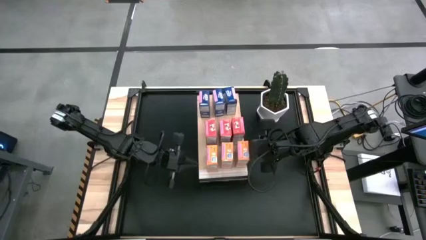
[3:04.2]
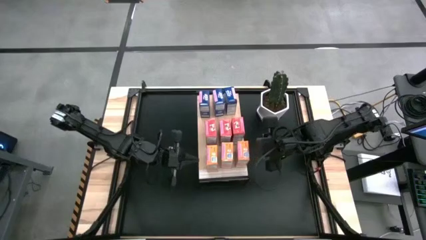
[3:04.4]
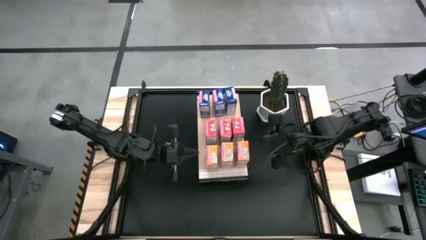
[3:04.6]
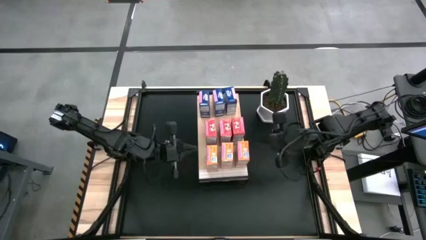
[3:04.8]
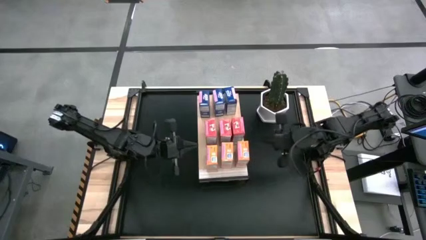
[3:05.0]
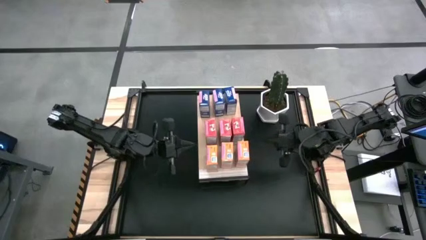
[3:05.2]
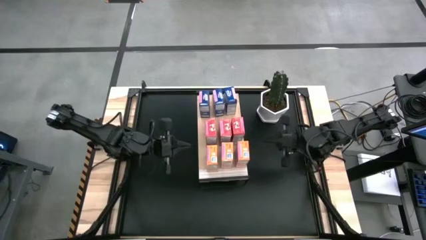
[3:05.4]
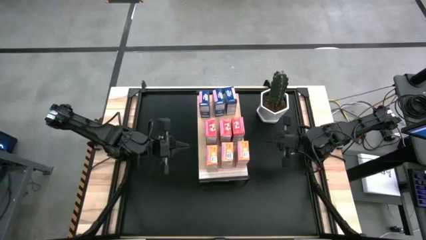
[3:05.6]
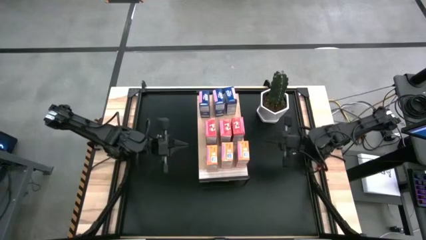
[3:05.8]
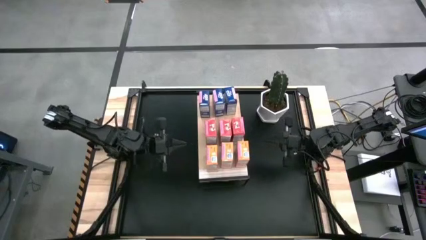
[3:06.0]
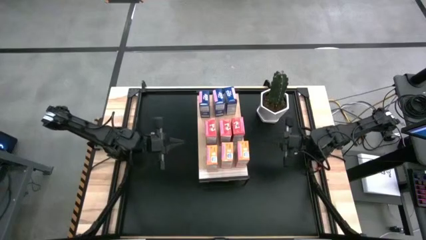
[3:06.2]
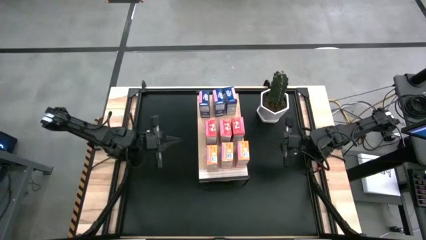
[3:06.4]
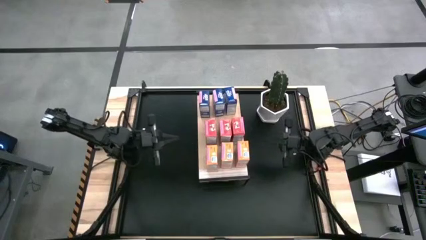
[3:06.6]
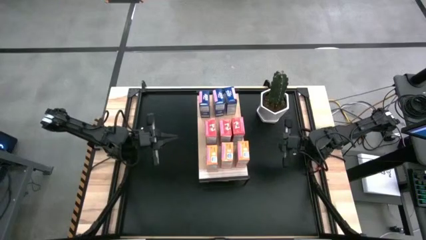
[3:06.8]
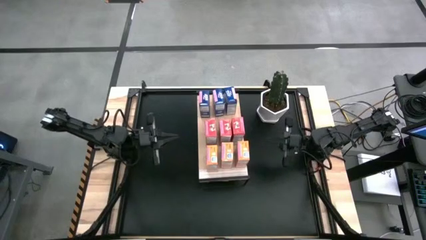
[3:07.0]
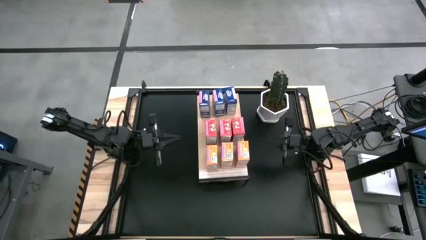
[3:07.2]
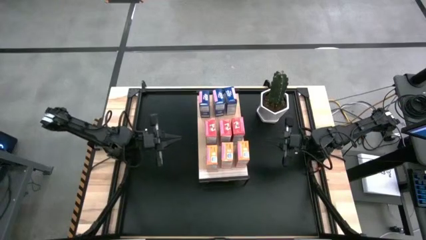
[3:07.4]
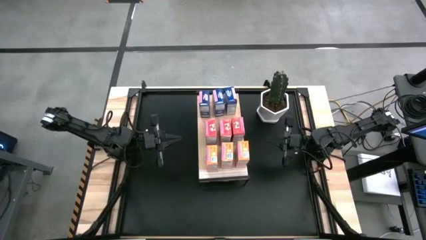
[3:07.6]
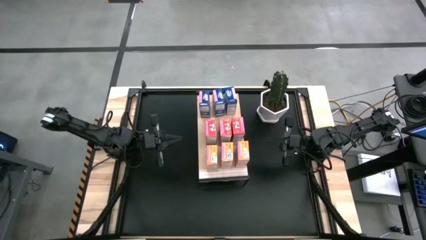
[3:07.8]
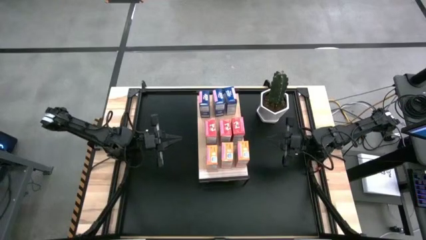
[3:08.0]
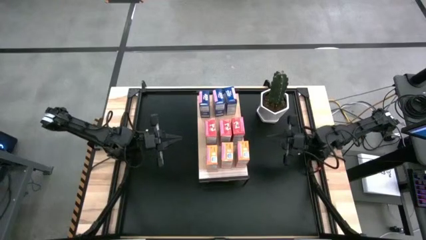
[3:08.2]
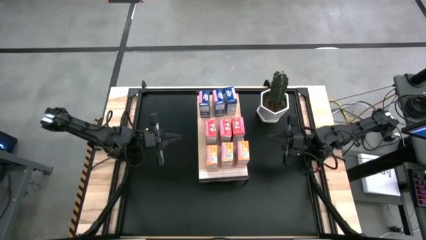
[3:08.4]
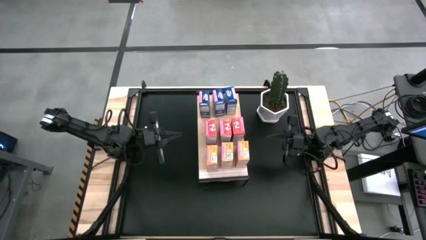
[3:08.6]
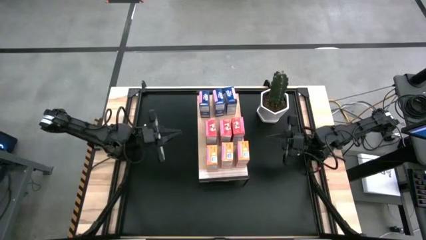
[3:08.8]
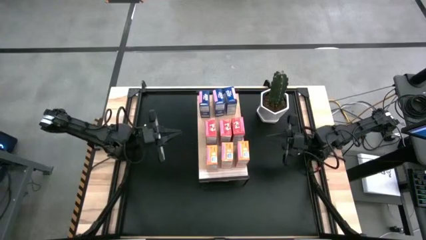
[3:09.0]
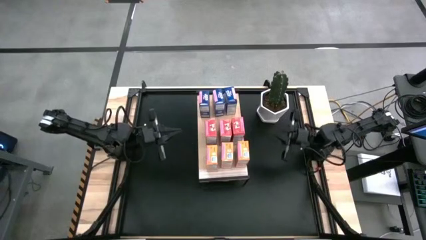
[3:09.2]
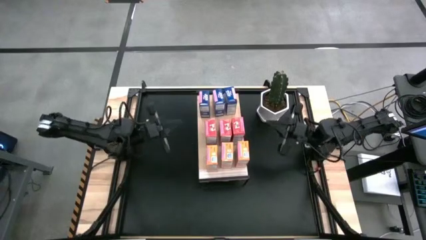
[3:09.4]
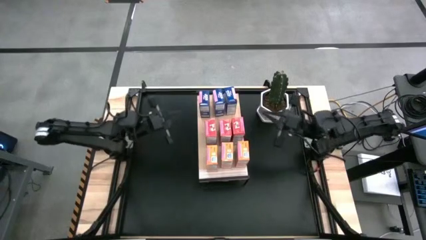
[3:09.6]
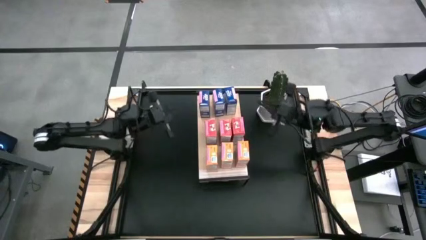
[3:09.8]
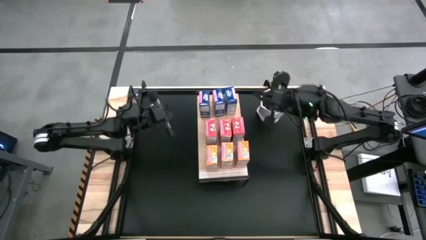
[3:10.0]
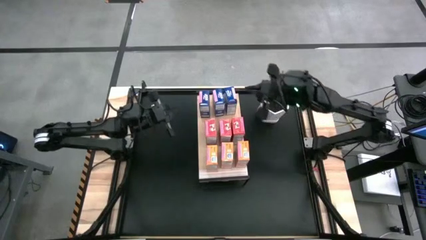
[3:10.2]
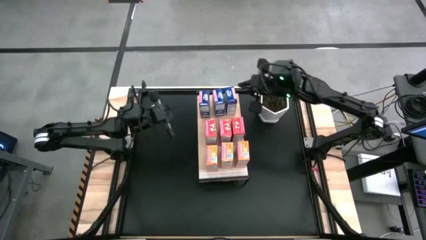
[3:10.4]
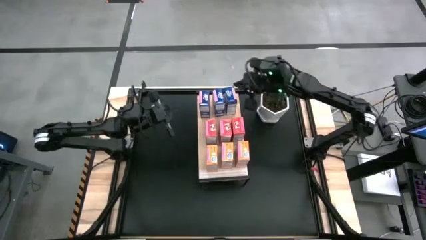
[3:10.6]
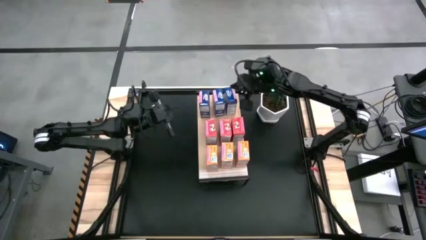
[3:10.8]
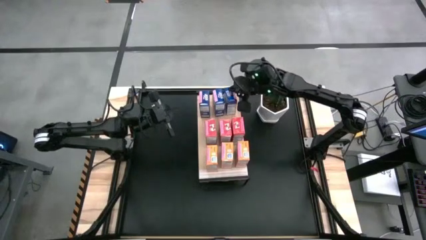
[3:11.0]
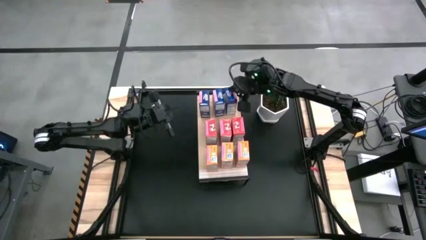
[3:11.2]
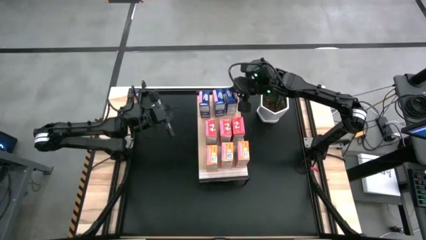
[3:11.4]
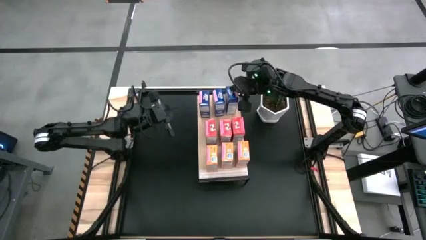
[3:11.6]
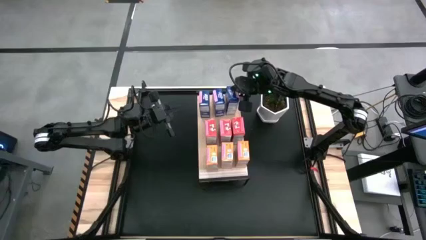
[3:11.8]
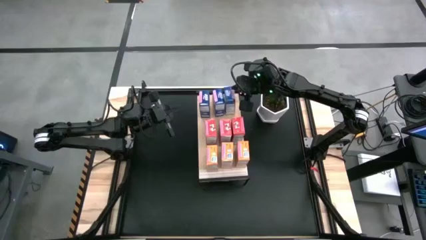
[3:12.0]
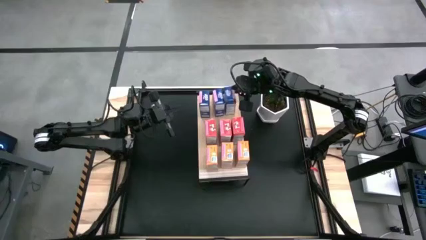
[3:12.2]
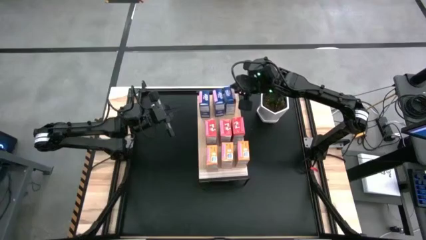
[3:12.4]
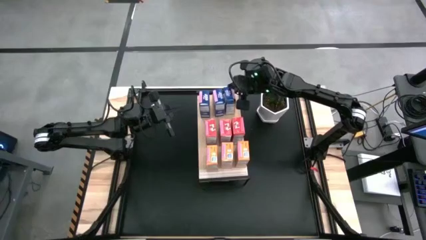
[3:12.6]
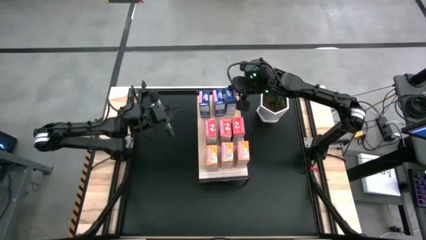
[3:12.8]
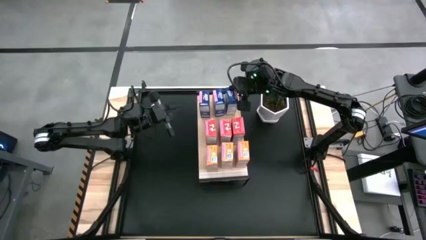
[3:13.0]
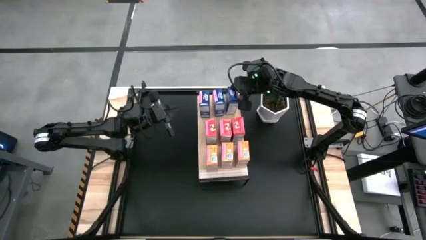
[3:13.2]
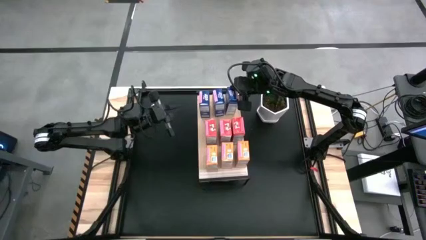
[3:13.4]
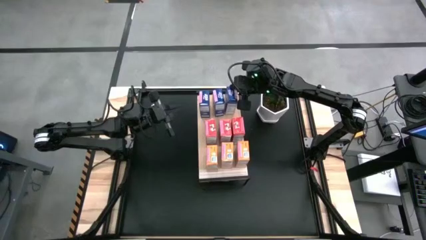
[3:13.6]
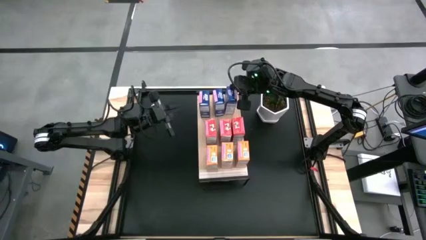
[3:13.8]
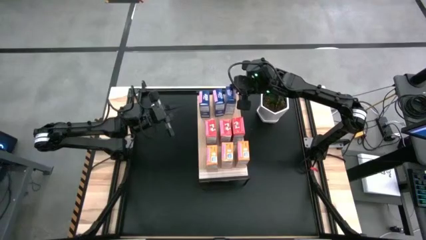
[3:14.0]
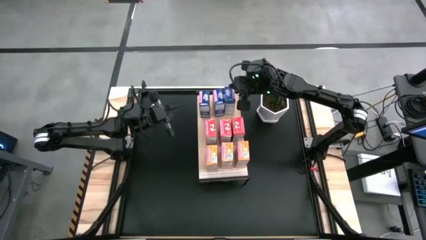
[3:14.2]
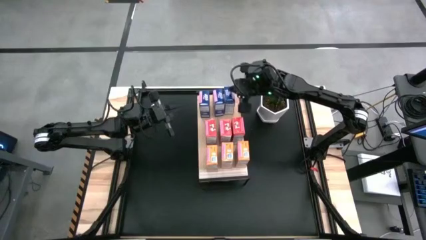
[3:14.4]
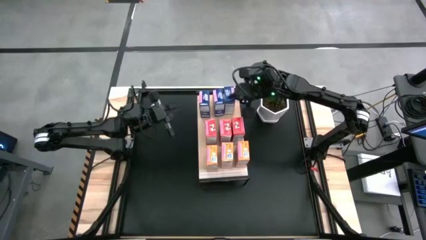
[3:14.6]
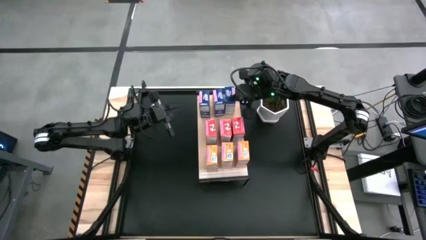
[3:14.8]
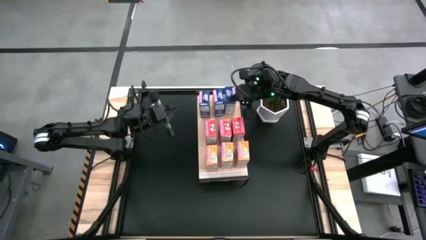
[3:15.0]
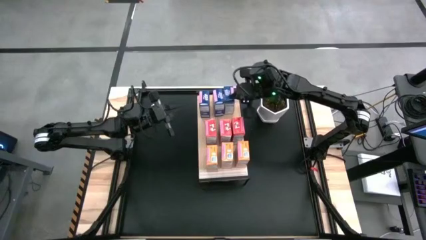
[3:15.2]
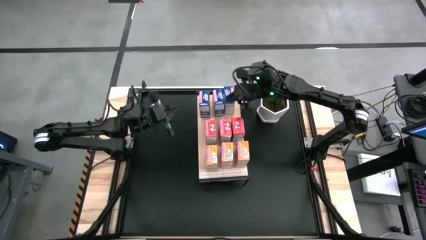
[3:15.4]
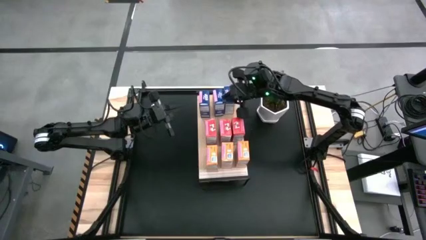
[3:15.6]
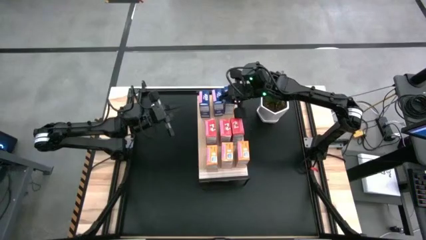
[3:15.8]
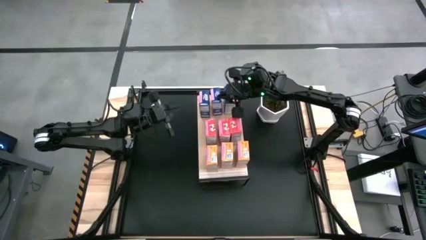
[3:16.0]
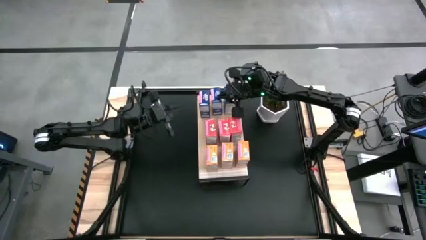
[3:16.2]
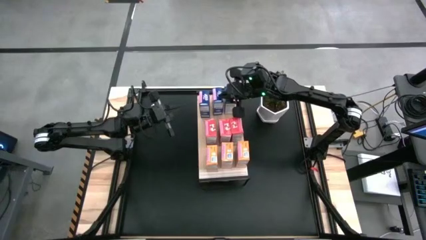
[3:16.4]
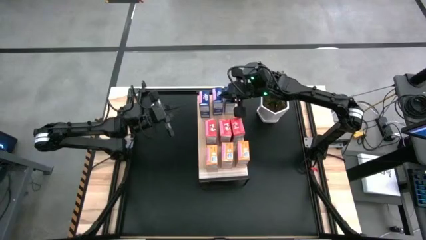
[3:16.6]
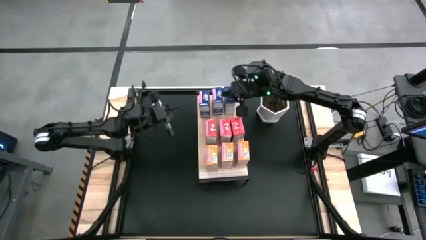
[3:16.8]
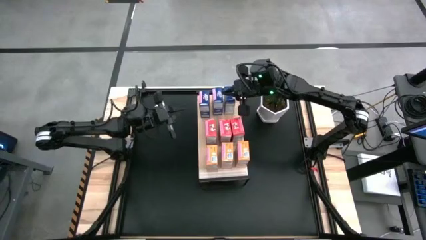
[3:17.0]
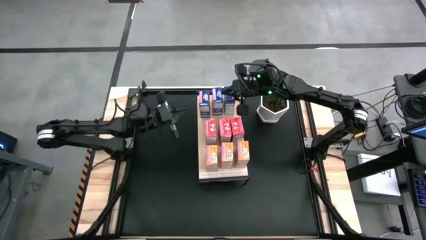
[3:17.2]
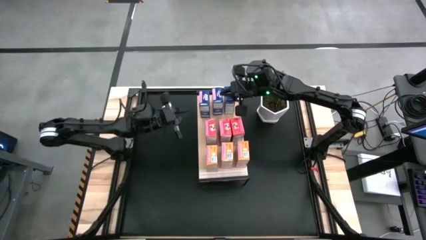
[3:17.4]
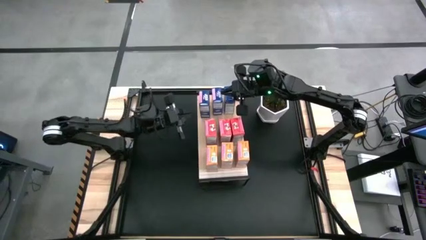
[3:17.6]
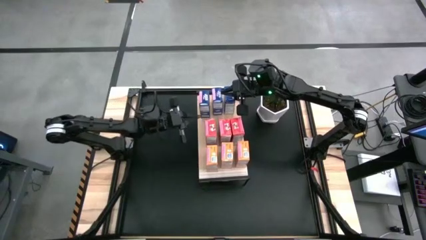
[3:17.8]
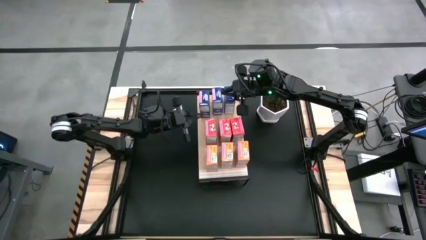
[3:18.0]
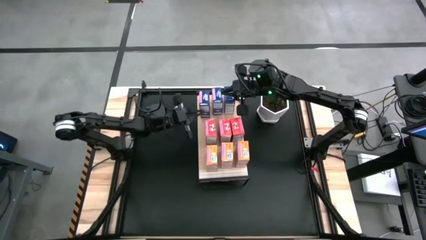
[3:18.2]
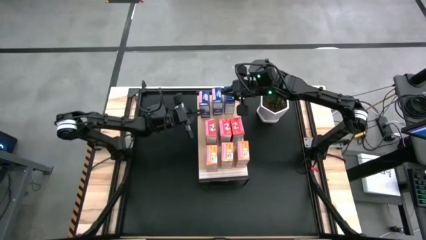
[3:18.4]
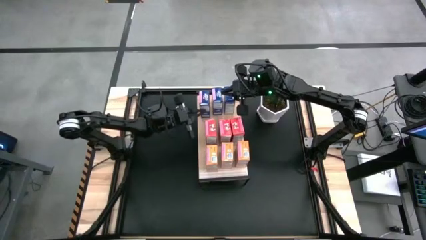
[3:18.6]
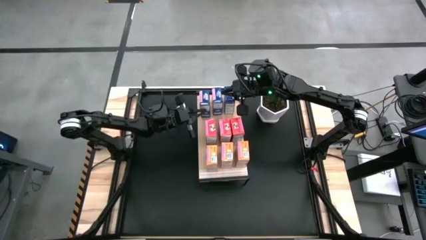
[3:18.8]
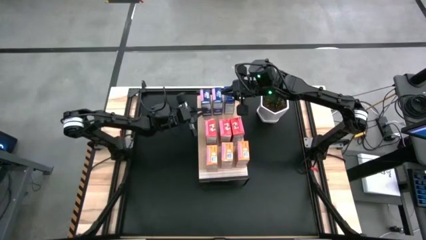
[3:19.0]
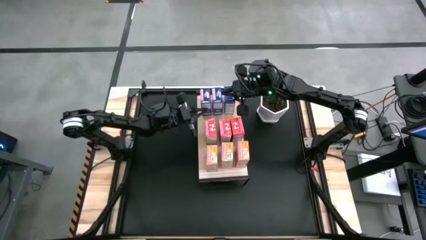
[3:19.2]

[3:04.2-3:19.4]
Task: Stack cereal on shelf
Adjust the blue cereal boxes

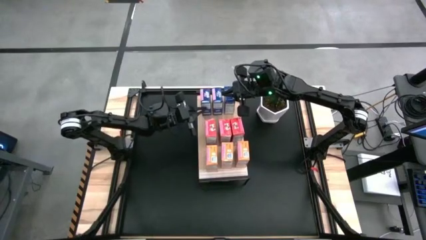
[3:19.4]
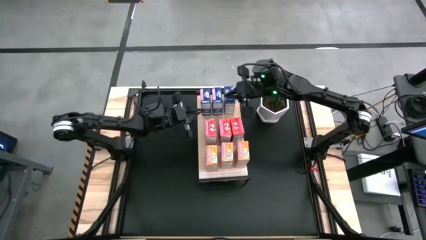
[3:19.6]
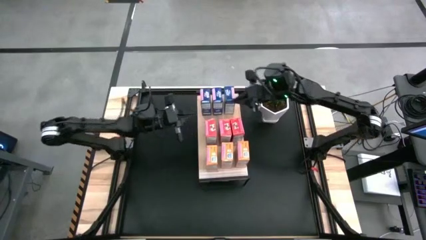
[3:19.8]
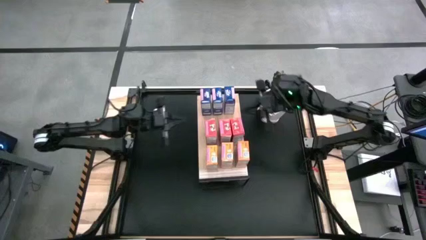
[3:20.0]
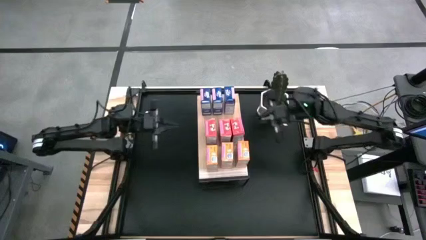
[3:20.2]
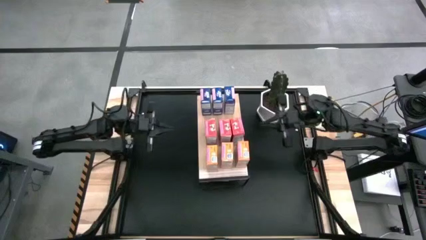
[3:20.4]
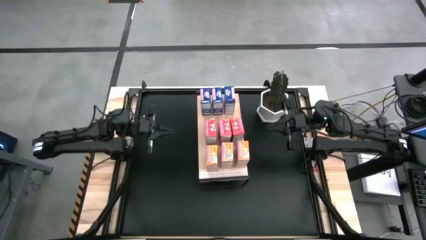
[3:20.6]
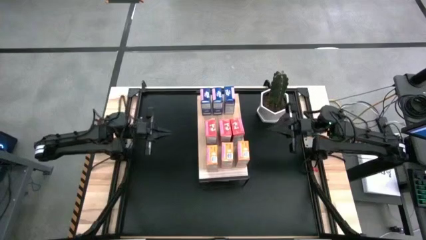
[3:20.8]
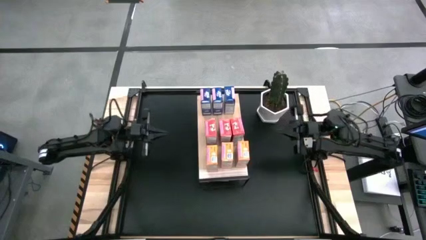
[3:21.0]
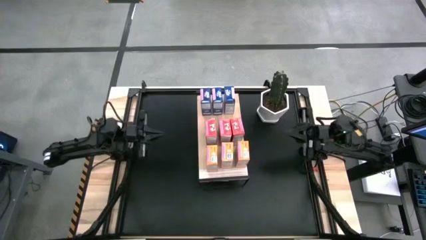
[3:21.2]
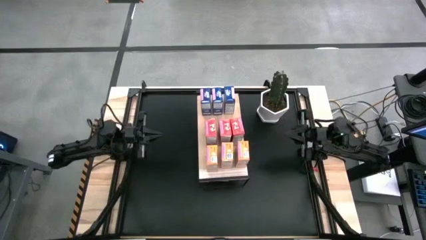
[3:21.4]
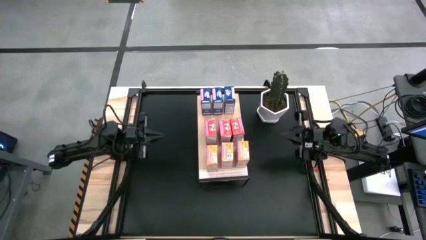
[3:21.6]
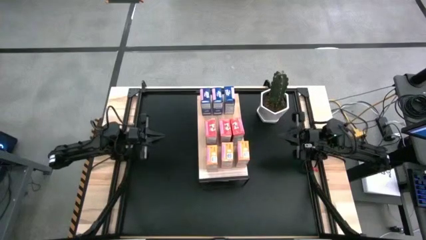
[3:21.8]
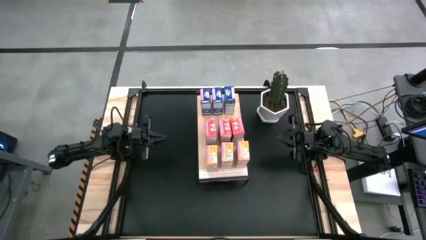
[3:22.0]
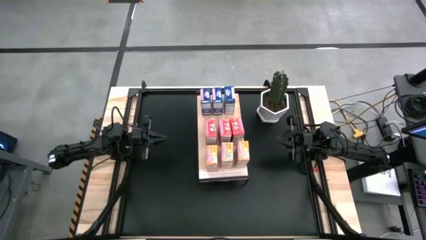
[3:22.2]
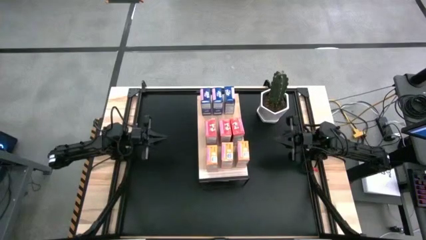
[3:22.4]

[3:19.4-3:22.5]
Return to Home Position
